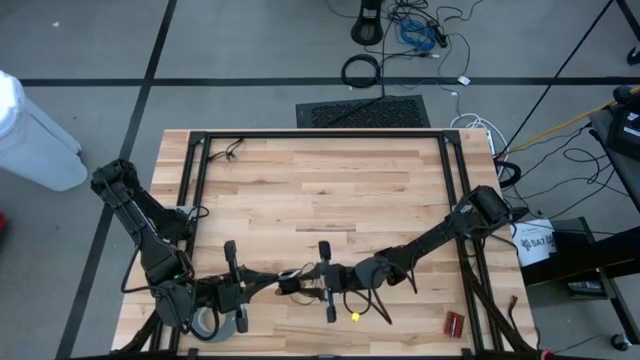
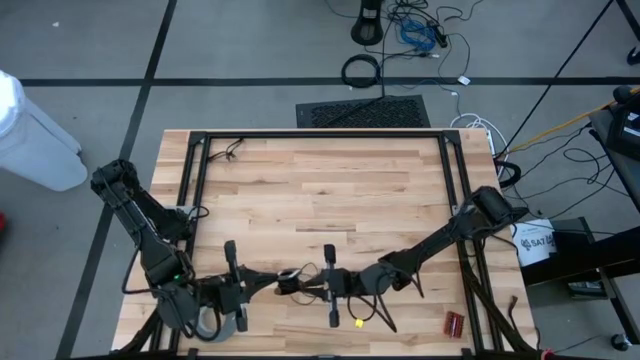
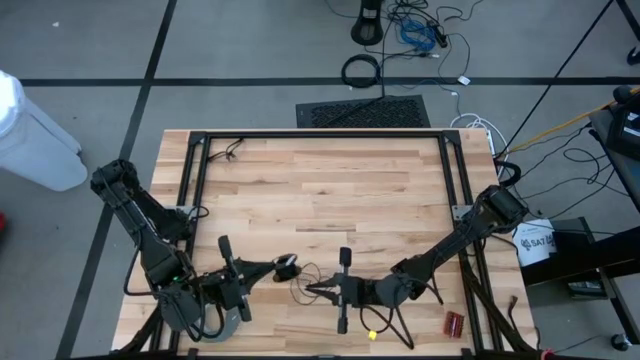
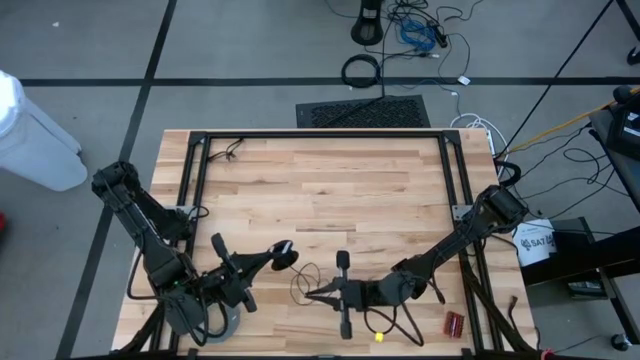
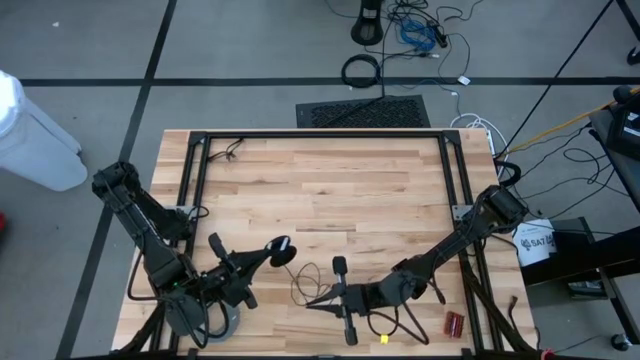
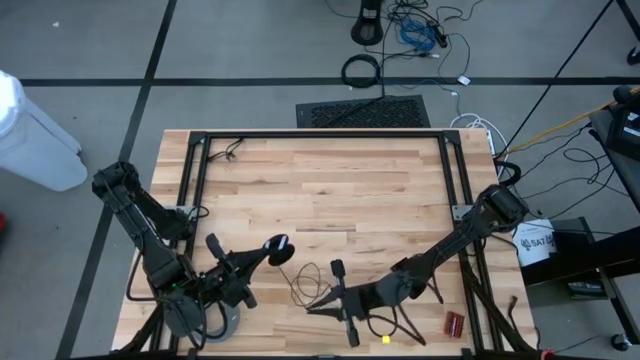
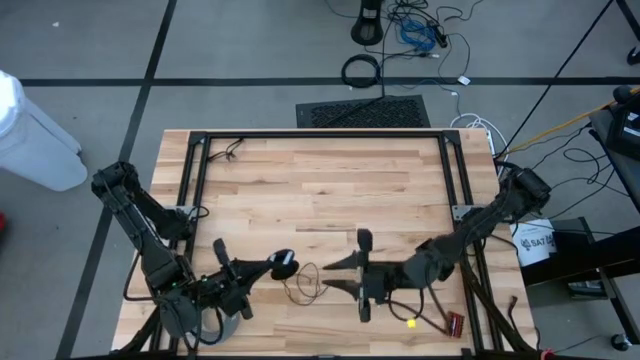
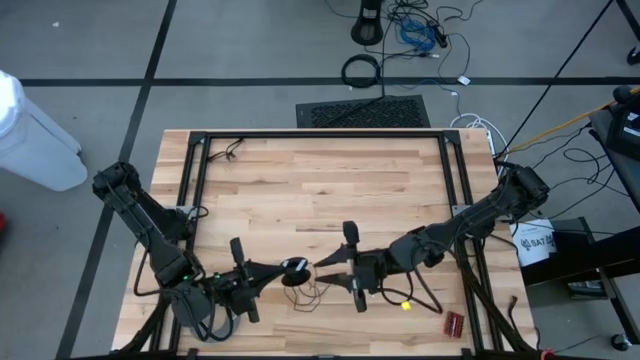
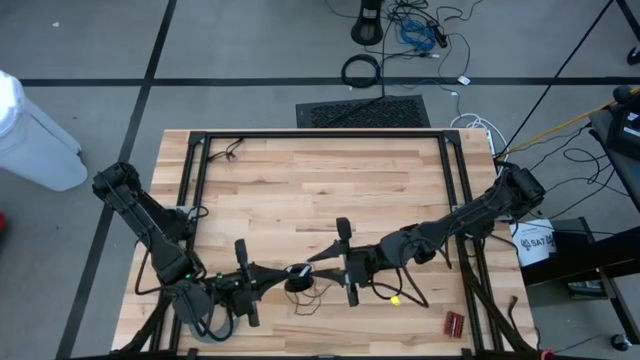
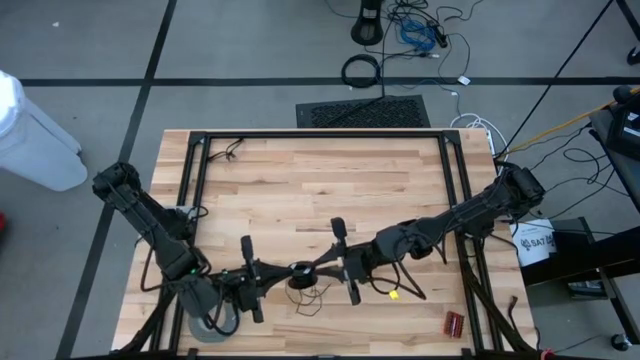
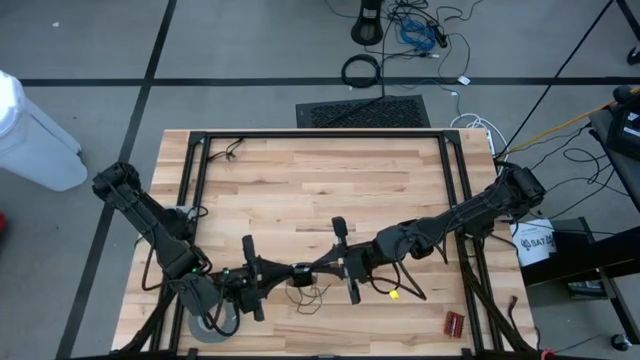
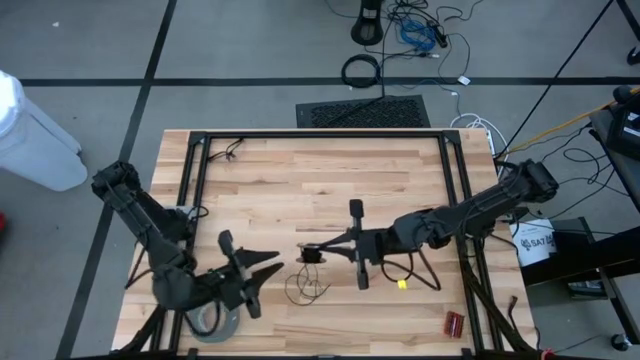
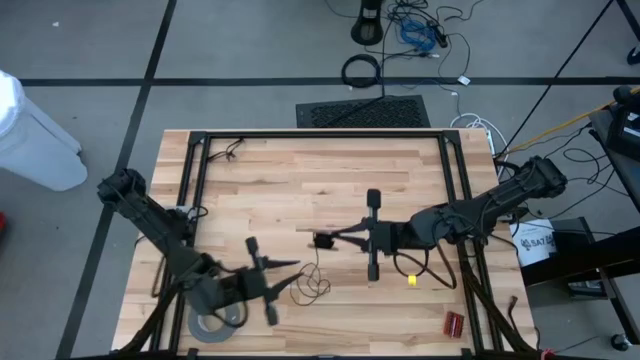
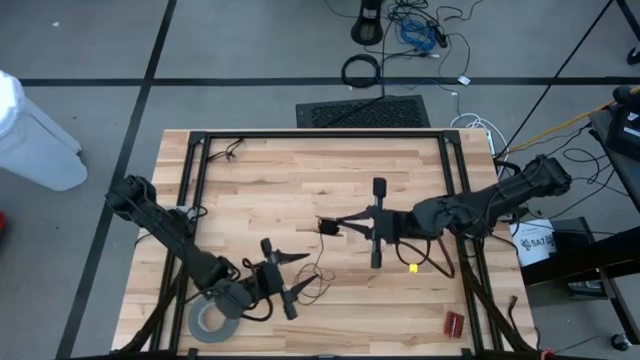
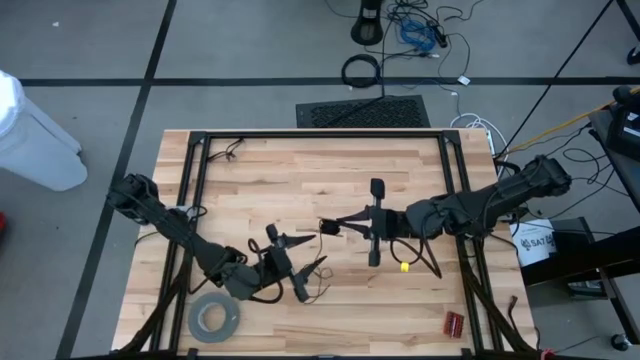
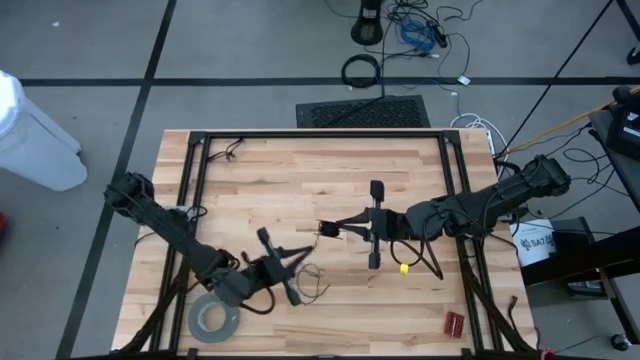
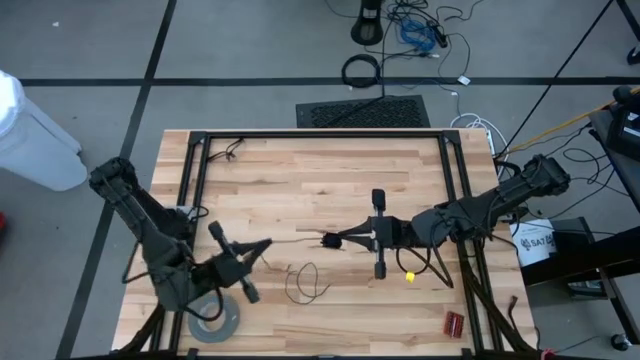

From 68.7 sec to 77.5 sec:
Task: Coil cords
Uncoil the black wire from the spool

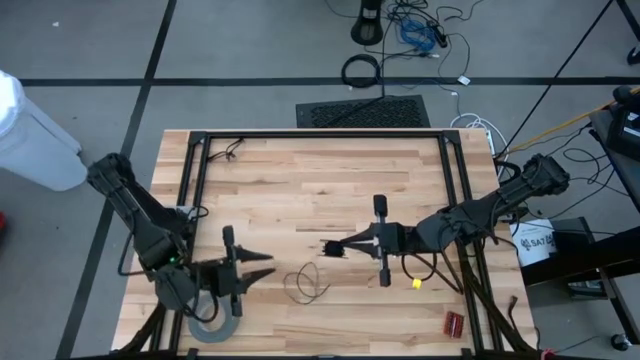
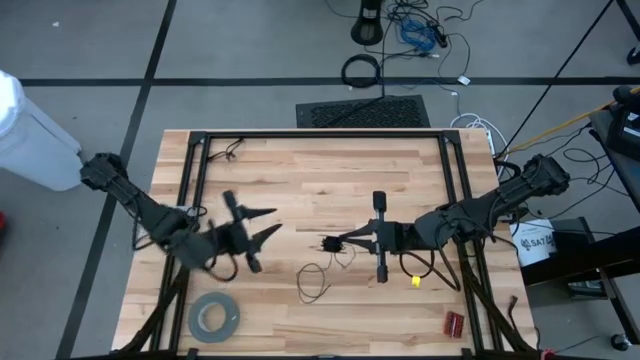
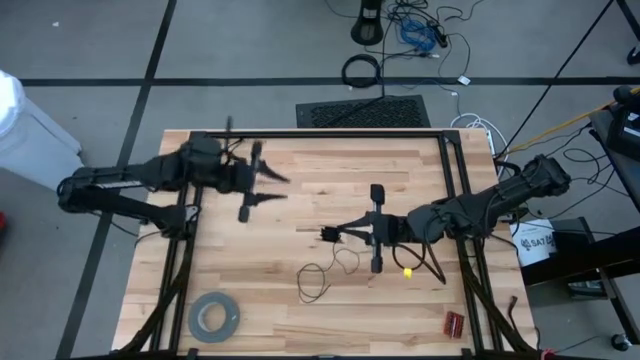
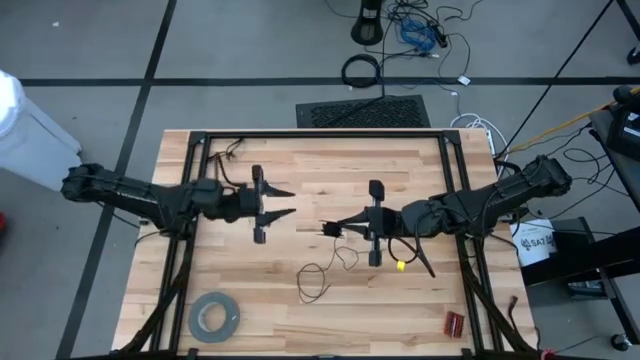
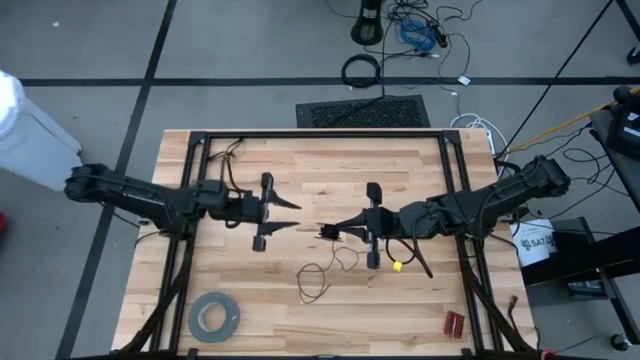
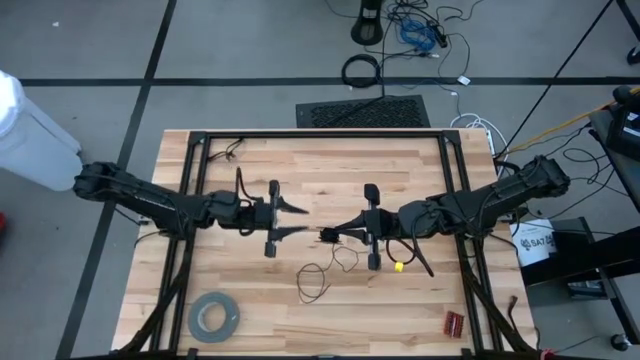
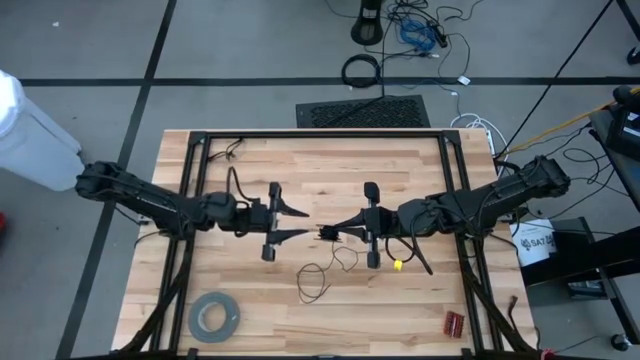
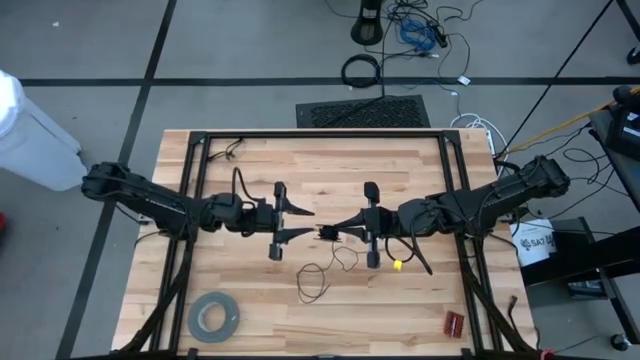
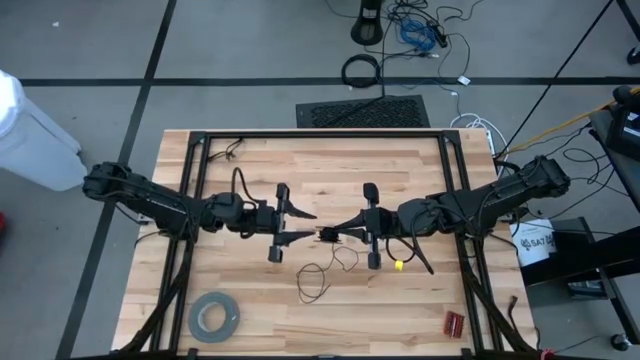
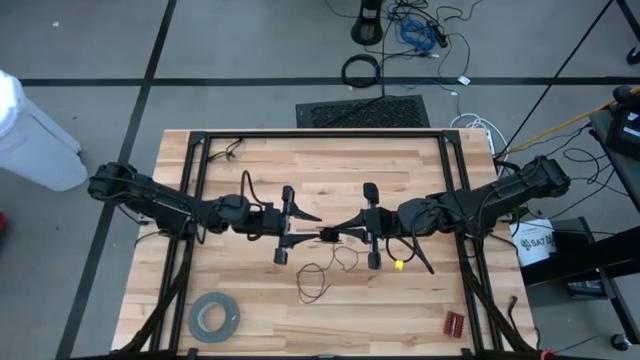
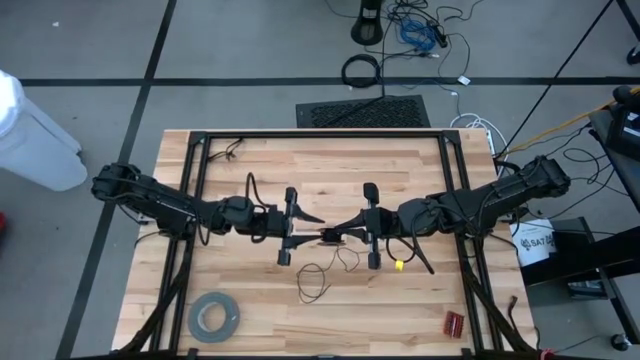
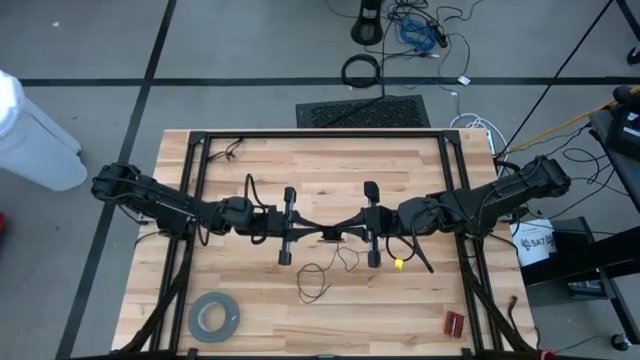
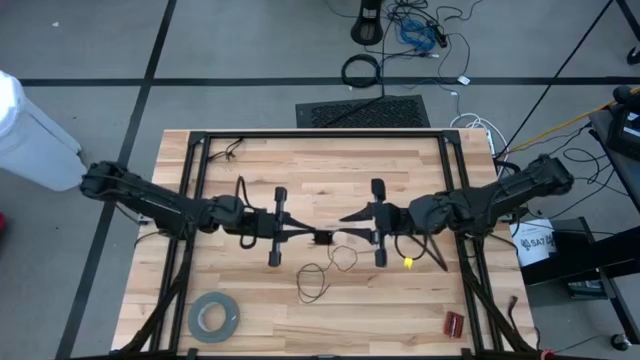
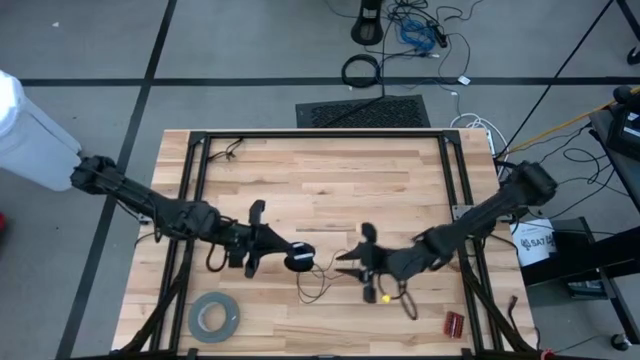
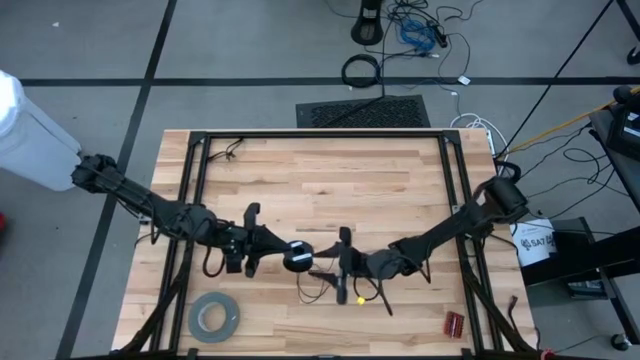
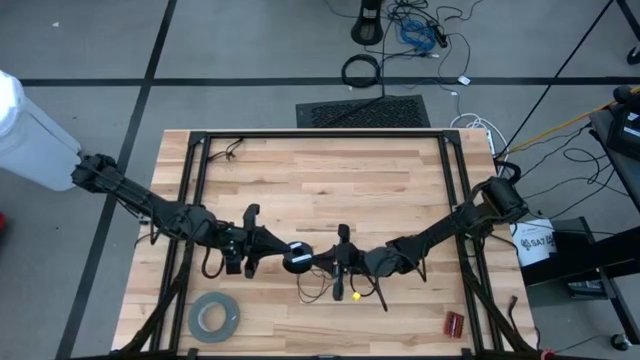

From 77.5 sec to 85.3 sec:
Uncoil the black wire from the spool

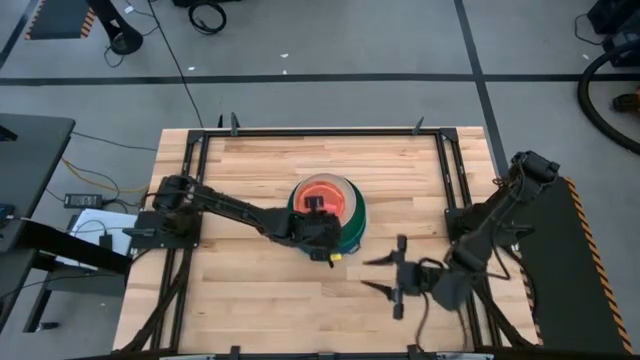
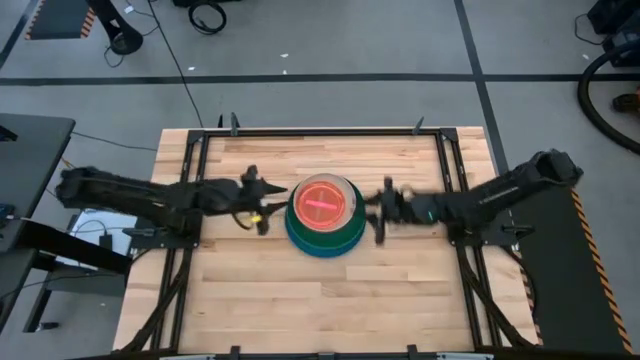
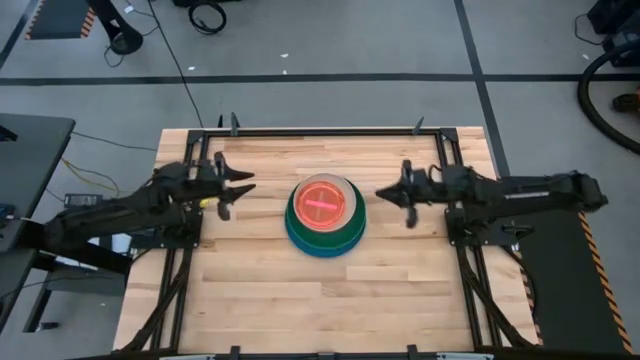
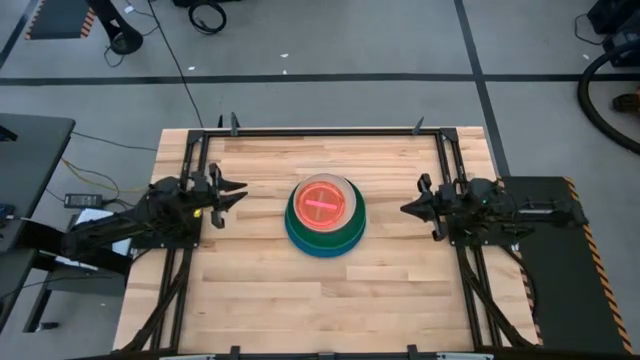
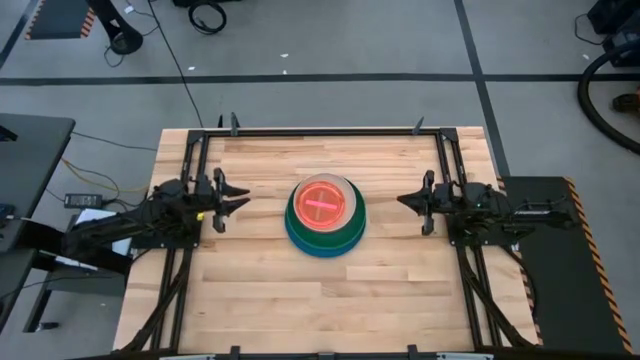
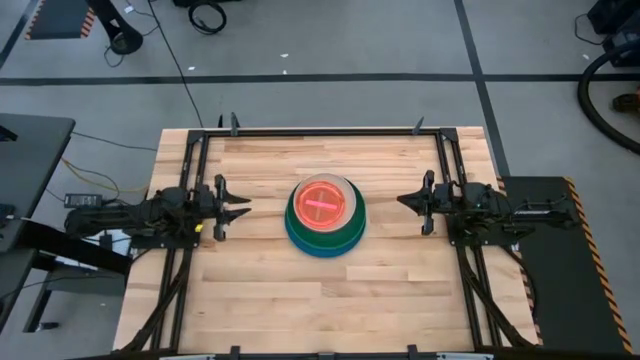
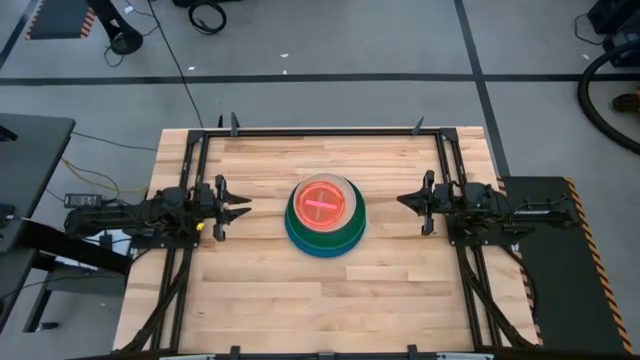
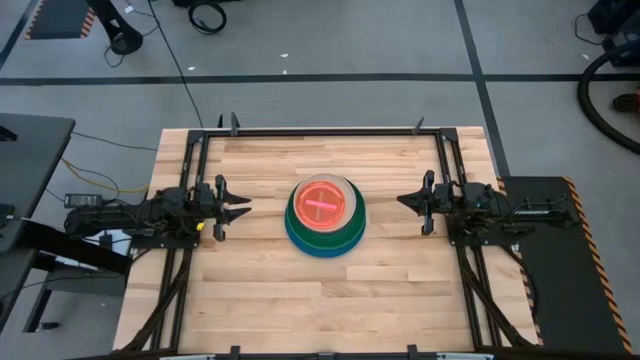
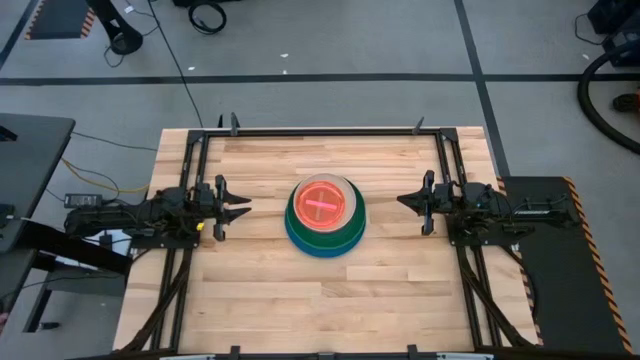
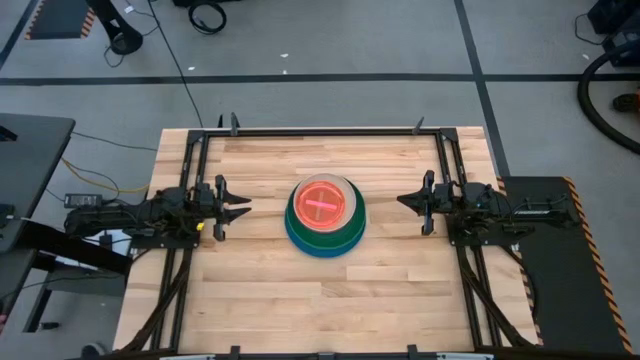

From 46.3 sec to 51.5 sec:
Task: Stack plastic plates
Return to Home Position
